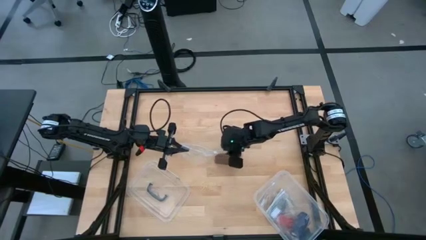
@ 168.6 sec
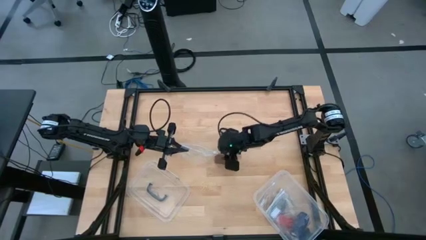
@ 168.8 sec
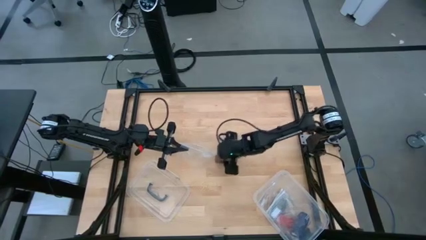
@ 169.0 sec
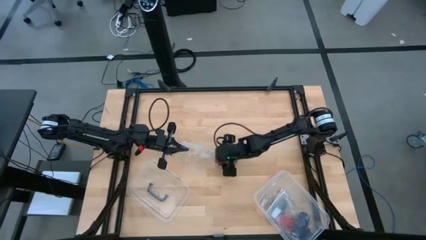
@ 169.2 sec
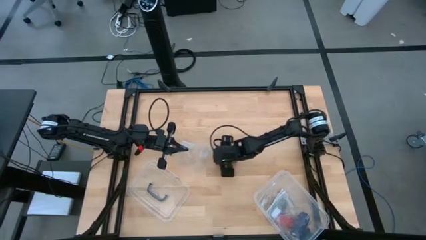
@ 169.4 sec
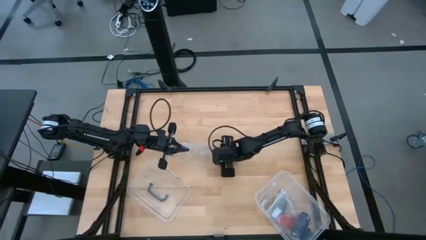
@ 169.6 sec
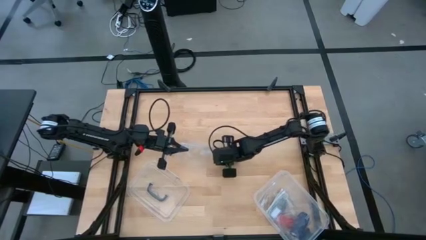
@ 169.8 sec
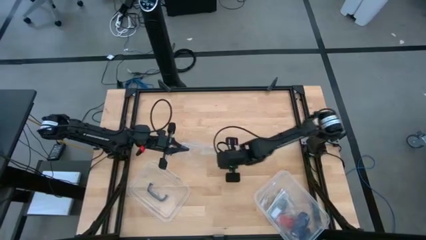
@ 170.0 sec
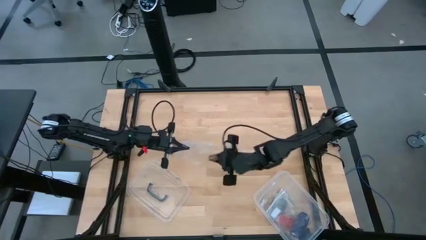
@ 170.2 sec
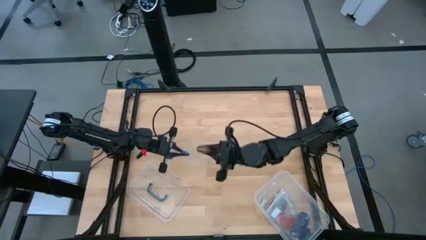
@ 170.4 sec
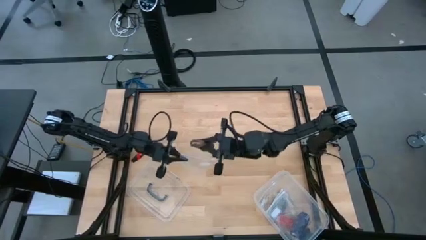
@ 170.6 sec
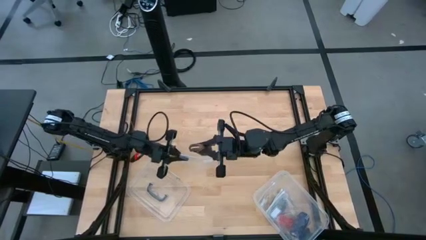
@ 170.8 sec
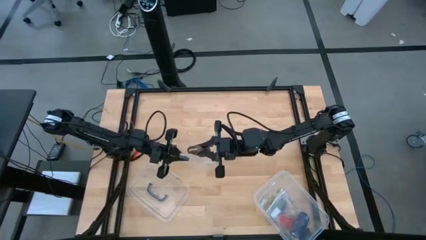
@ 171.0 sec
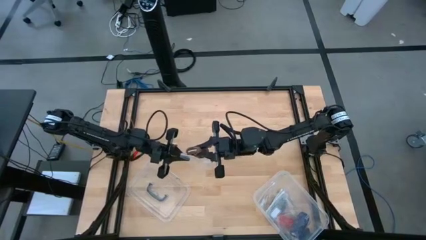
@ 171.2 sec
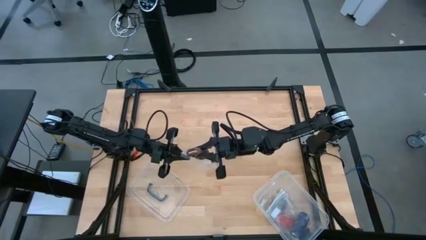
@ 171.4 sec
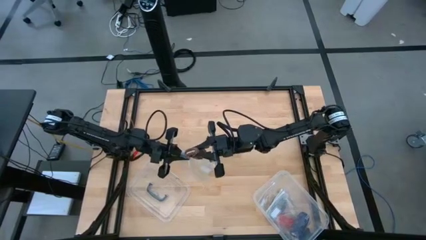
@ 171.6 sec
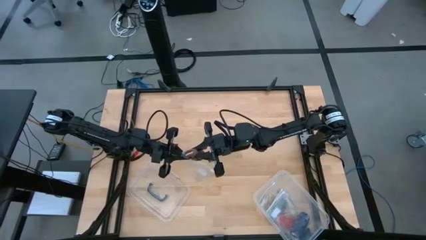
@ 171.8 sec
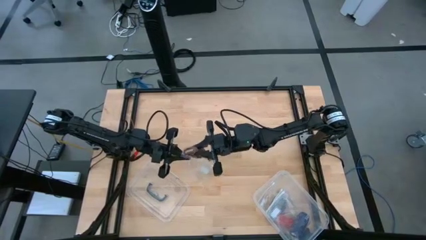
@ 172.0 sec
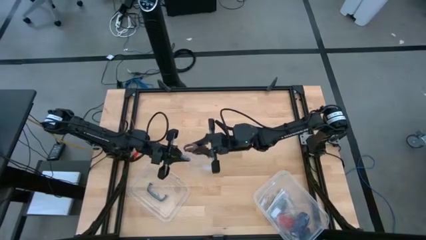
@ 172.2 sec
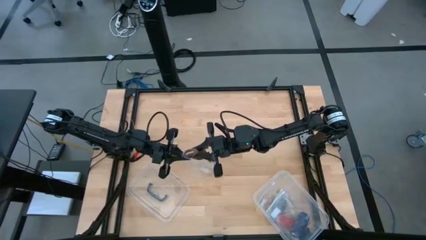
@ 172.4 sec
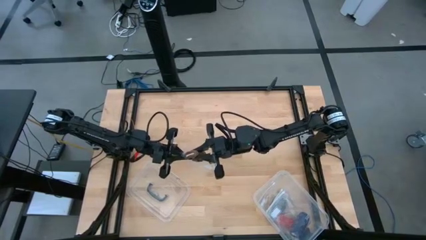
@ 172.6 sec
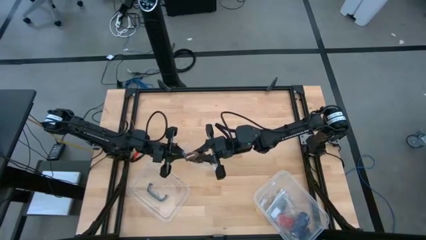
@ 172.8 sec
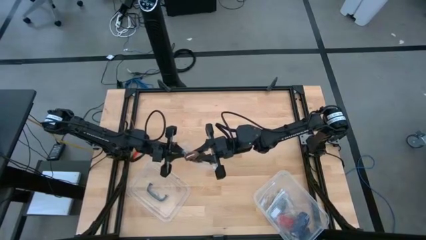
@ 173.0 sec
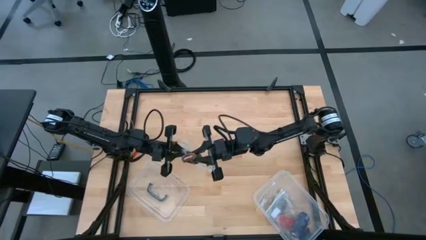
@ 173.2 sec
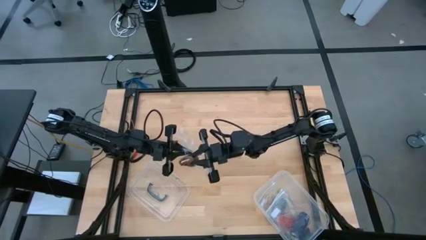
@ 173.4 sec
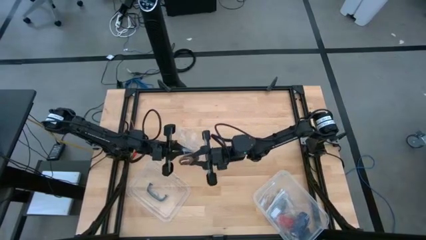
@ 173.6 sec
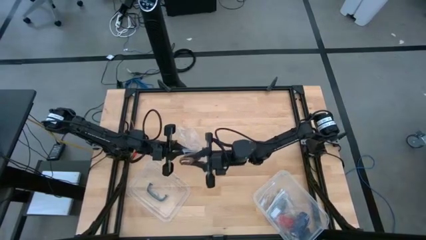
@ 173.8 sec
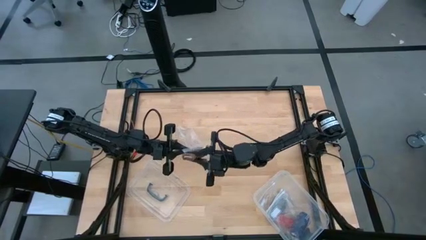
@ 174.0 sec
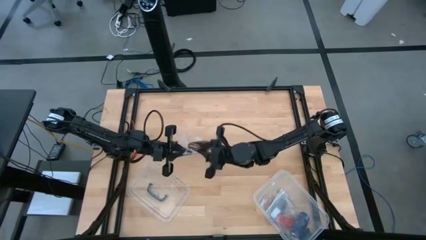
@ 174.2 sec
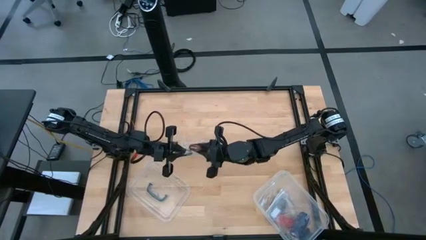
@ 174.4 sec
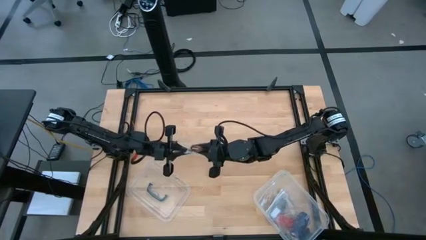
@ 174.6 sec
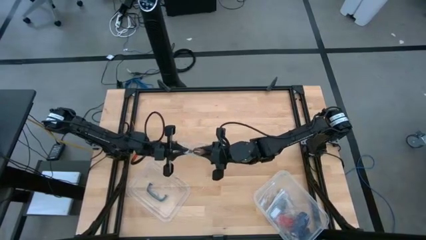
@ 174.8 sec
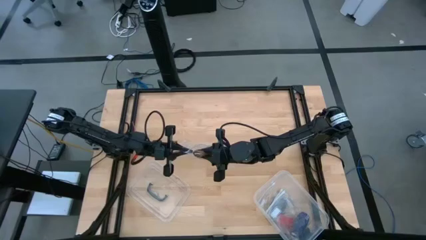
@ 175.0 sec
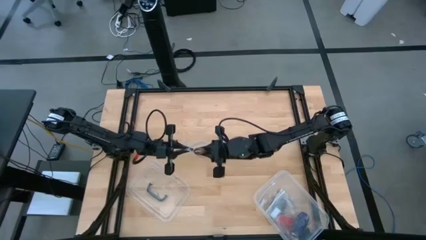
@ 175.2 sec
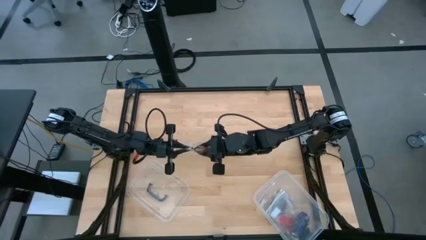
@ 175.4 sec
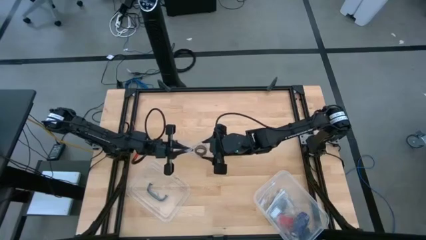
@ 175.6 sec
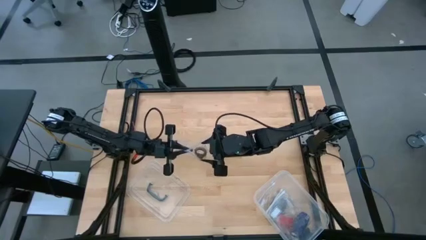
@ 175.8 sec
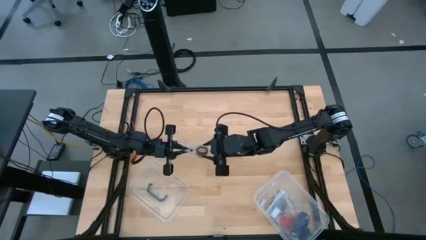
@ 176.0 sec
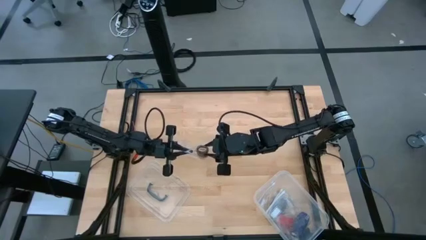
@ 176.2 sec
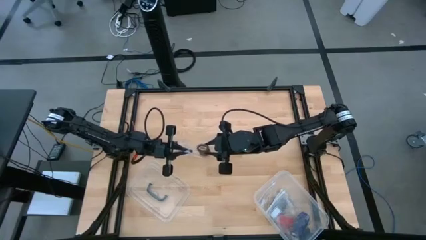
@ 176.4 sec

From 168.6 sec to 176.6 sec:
Task: Roll bandage
Put the rolled brown bandage into the transparent zip bag

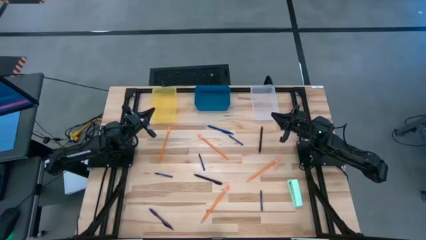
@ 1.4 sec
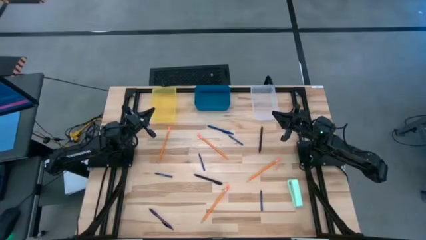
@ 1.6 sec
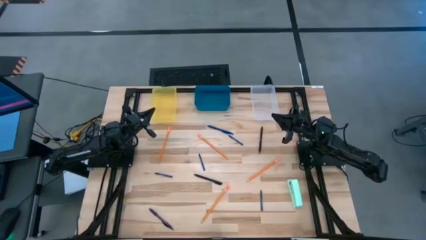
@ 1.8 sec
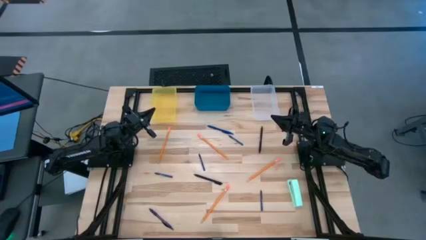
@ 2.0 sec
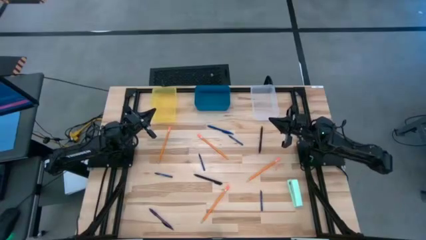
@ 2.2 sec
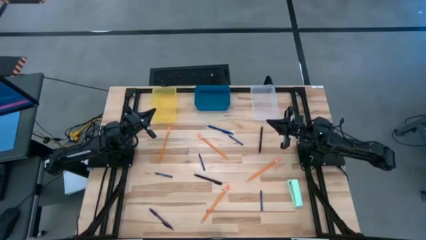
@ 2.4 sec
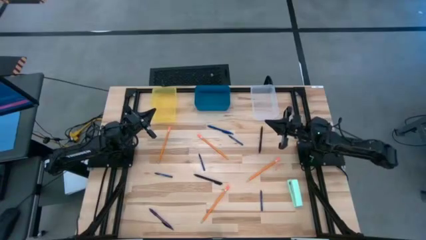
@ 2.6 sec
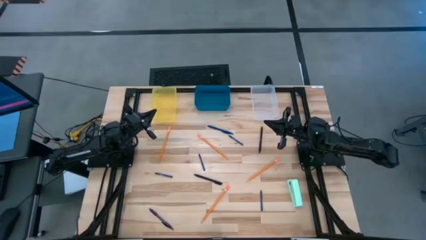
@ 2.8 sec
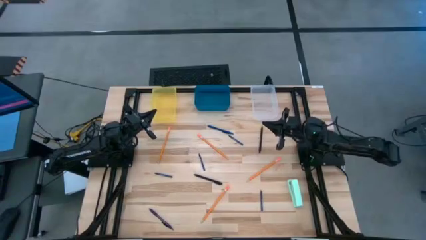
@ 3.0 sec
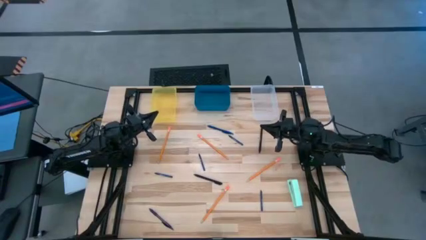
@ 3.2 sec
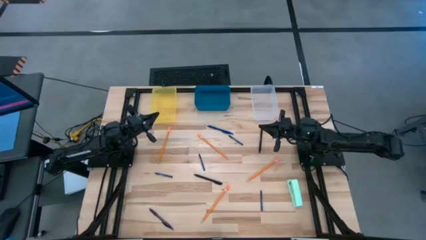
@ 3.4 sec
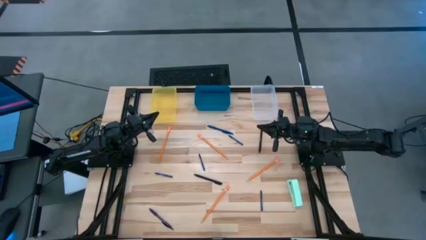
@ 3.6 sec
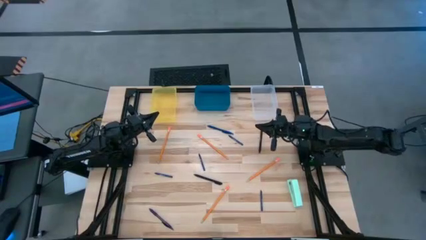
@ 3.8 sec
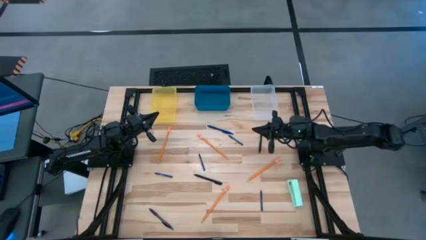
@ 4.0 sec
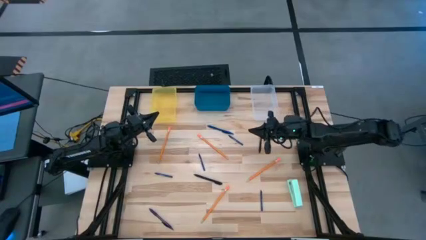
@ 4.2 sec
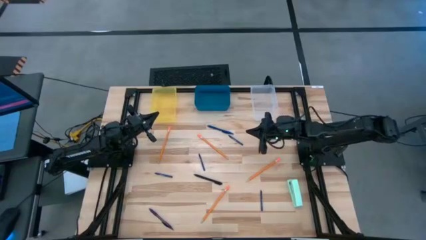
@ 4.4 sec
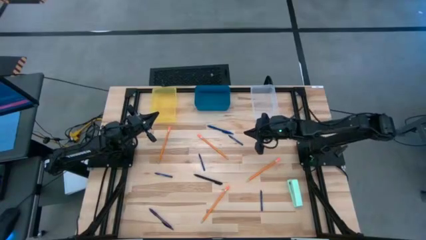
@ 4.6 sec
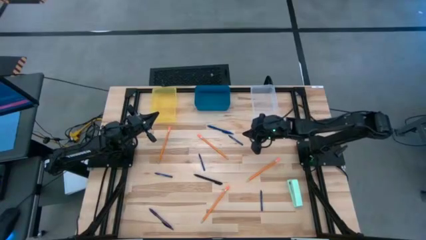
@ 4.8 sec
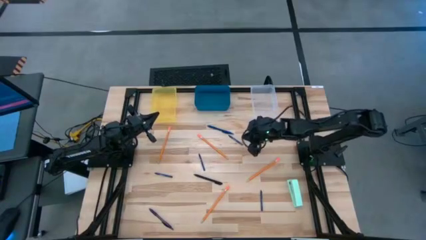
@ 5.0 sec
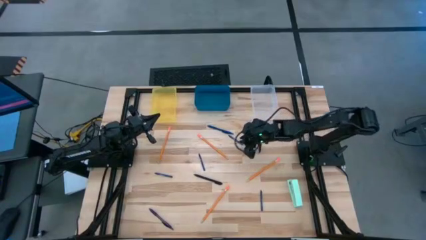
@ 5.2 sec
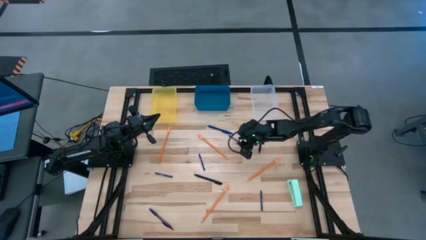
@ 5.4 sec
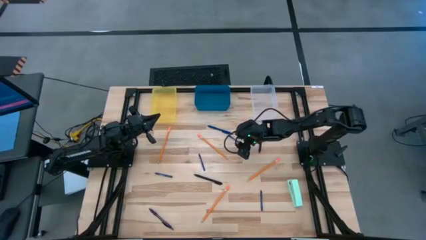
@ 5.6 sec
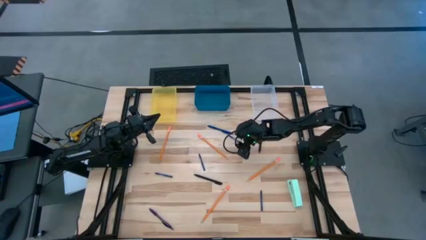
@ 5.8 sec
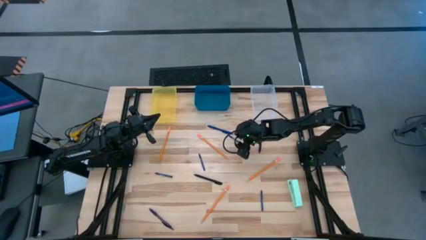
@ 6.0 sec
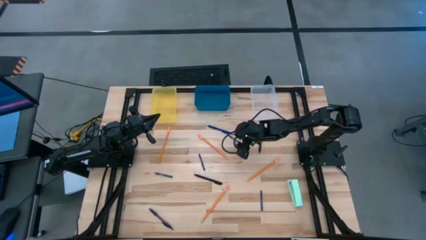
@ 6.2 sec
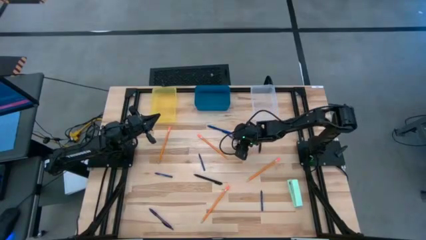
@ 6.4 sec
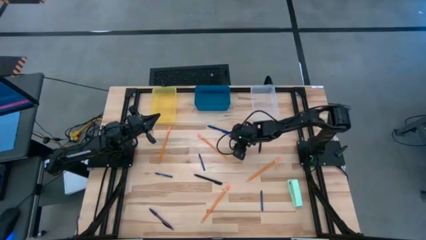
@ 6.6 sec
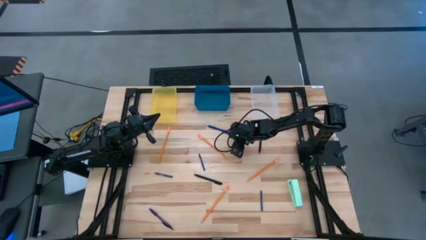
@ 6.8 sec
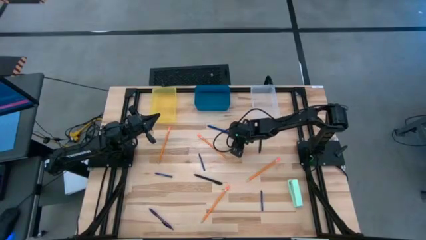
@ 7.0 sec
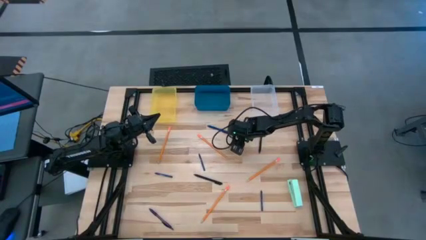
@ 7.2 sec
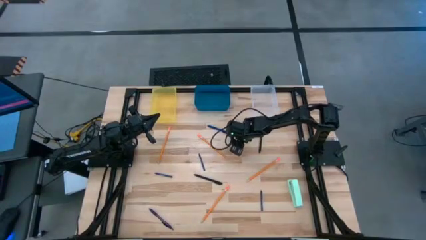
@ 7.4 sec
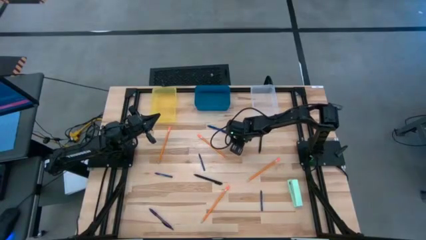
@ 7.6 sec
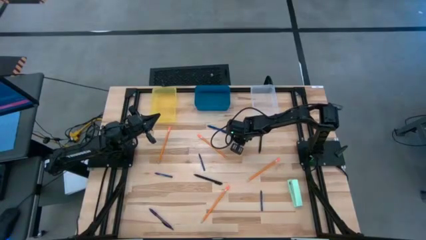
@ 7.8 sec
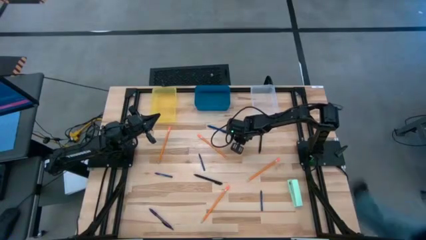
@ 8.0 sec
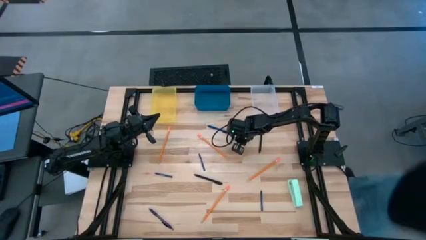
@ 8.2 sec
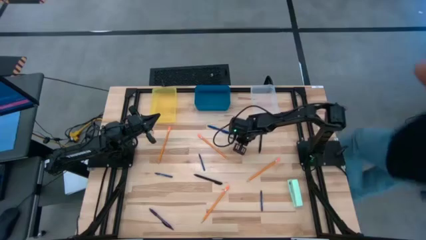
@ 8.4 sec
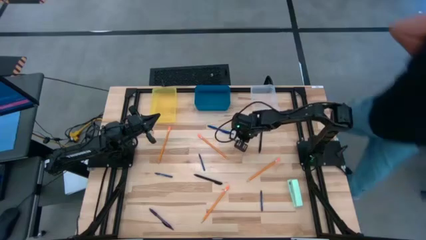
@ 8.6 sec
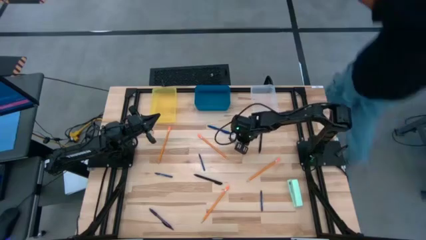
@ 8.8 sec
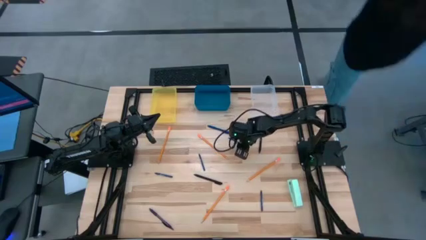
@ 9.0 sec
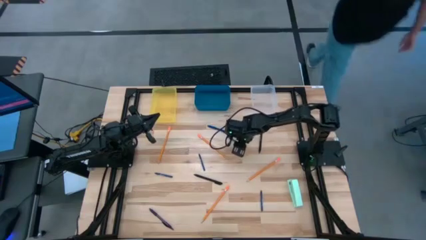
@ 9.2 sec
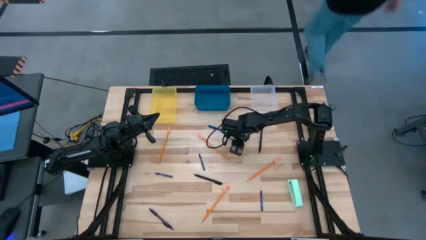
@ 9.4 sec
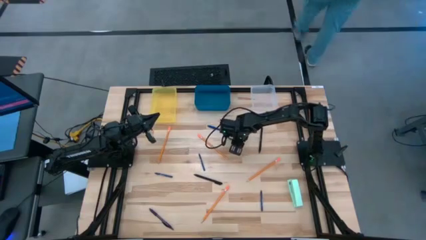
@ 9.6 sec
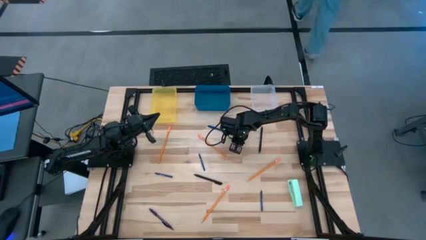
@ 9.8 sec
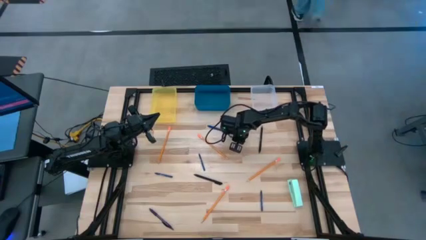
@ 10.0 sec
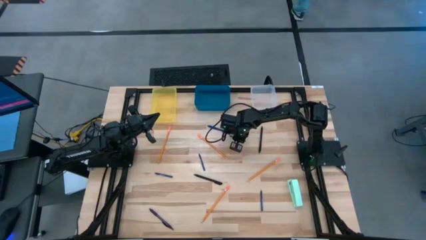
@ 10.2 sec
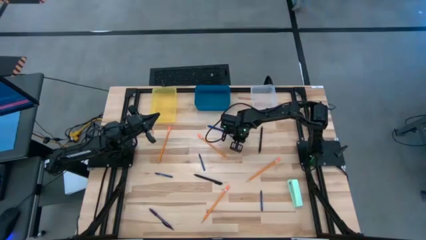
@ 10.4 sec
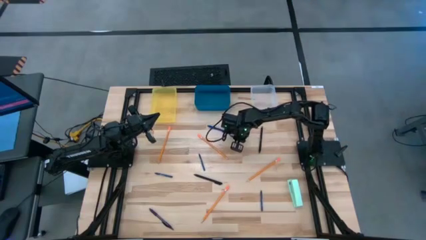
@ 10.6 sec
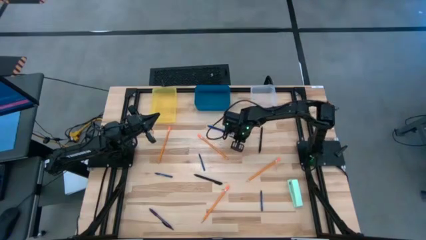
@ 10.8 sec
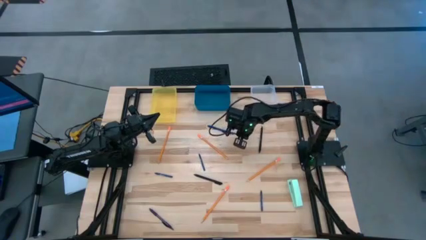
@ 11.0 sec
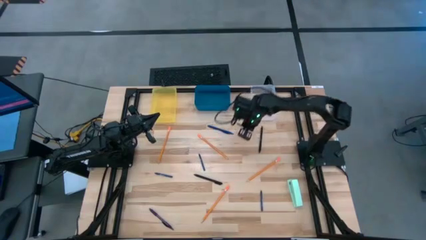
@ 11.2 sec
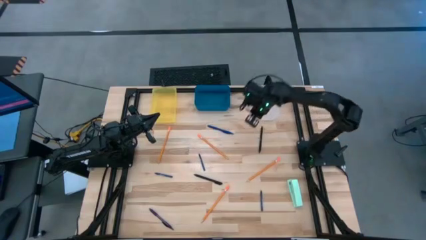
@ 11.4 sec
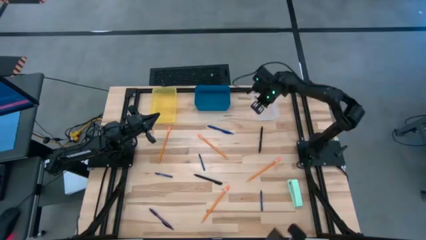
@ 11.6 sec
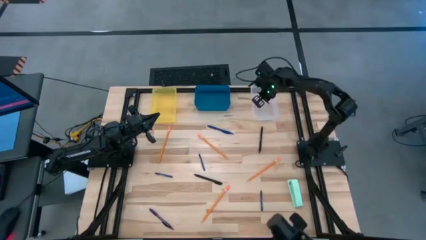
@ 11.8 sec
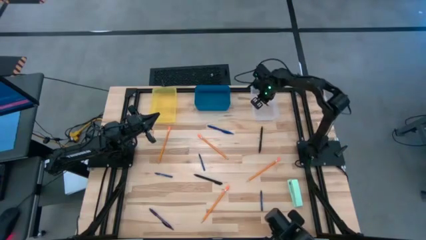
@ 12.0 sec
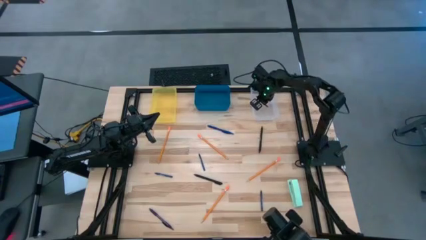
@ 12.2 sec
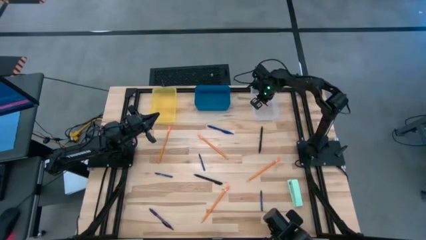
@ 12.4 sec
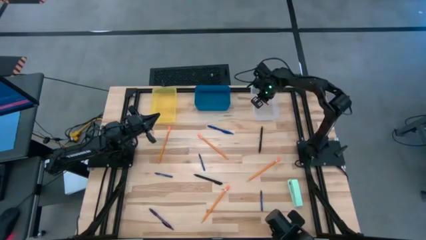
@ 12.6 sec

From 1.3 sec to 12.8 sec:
Task: Sort crayons/erasers/pens/pencils in bins
Put the blue crayon into the transparent white bin
